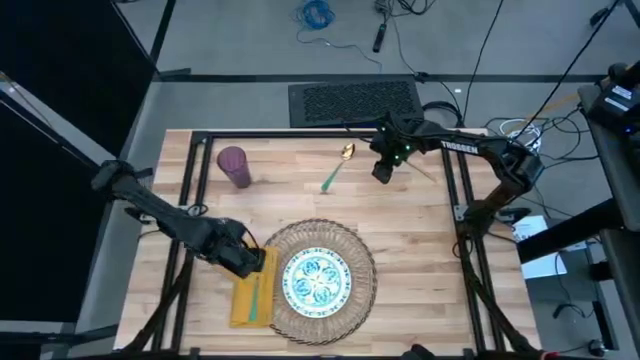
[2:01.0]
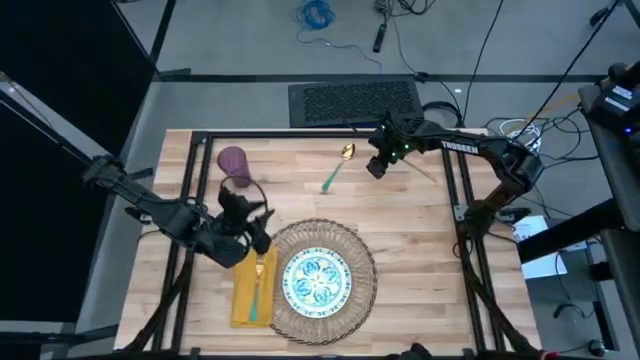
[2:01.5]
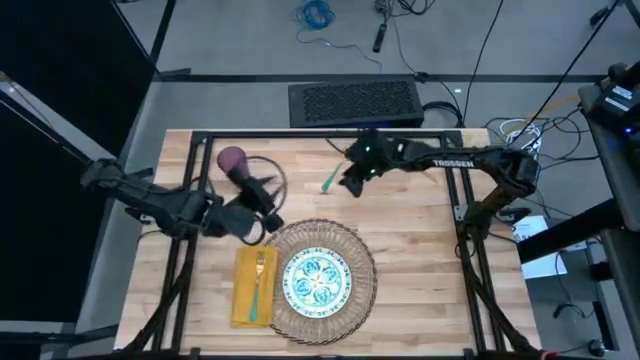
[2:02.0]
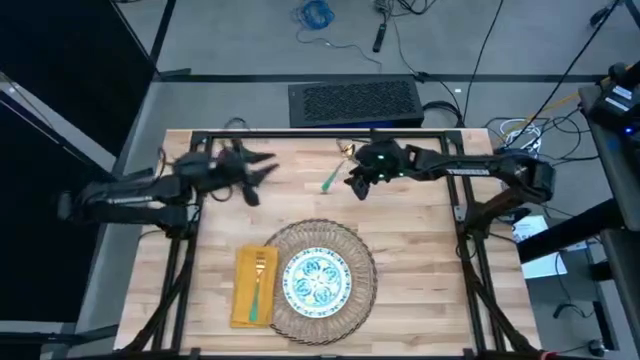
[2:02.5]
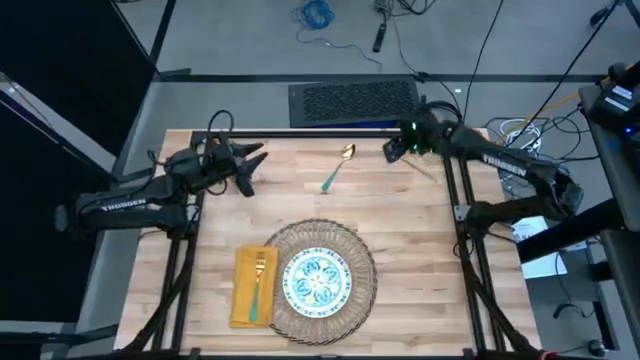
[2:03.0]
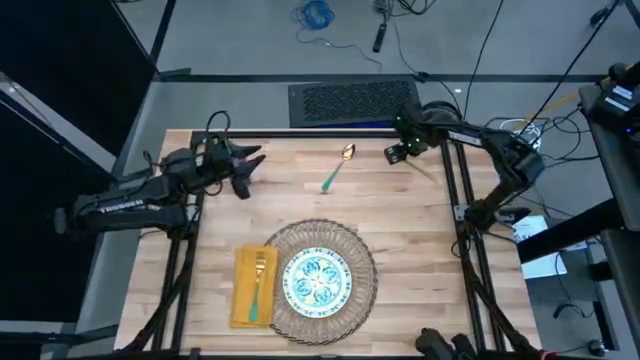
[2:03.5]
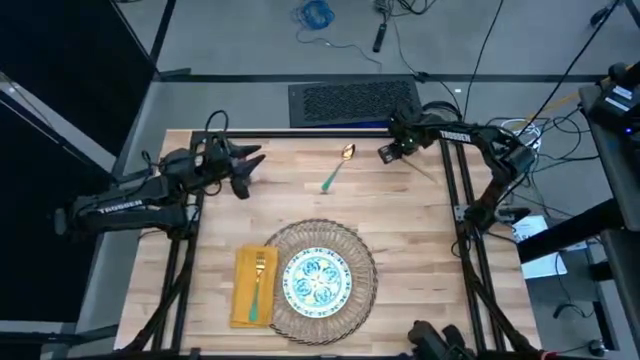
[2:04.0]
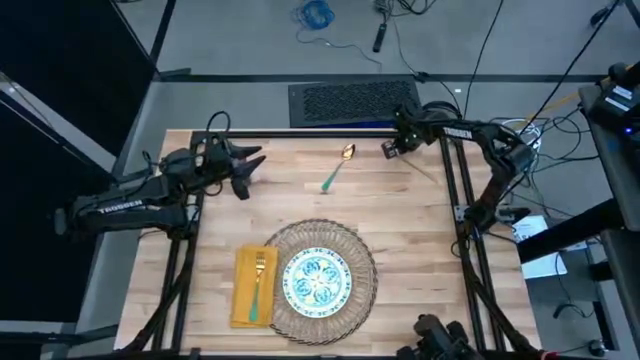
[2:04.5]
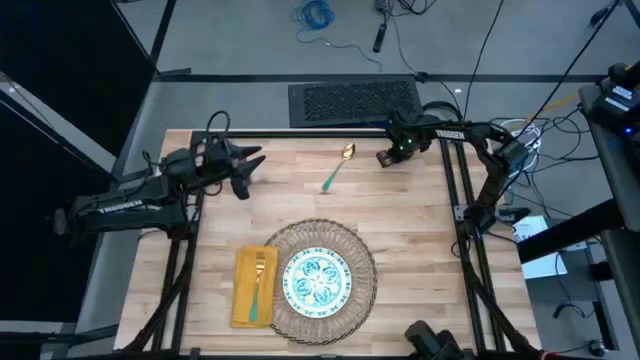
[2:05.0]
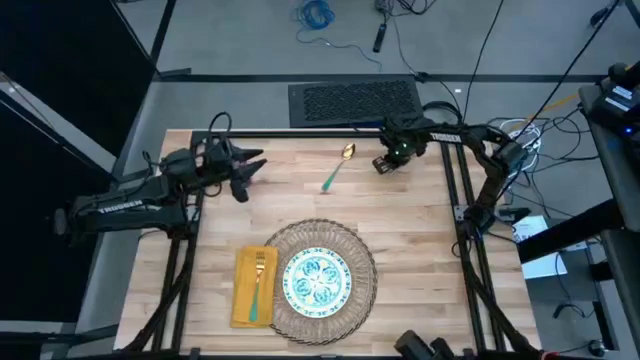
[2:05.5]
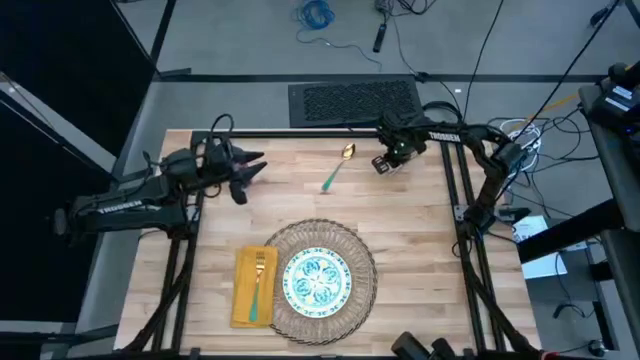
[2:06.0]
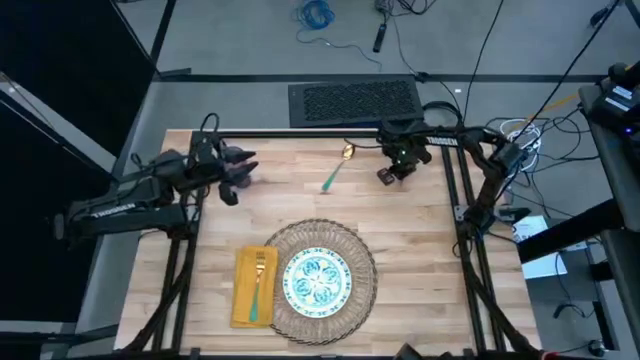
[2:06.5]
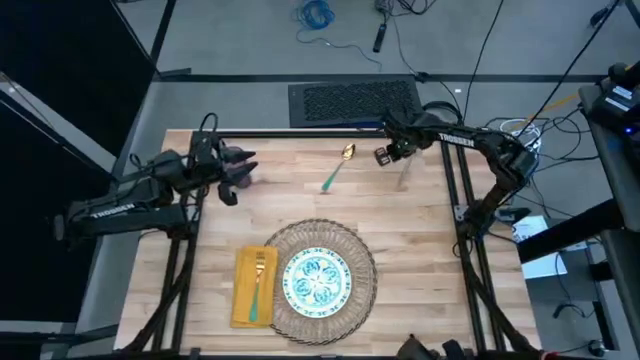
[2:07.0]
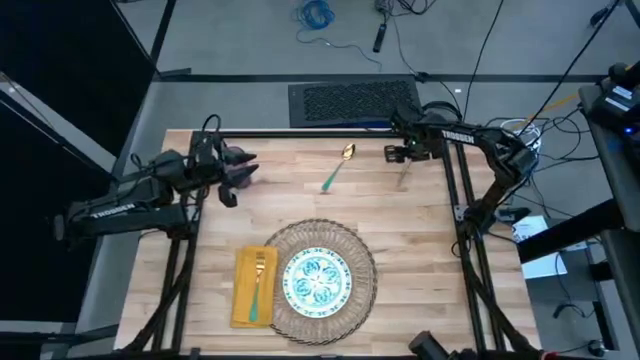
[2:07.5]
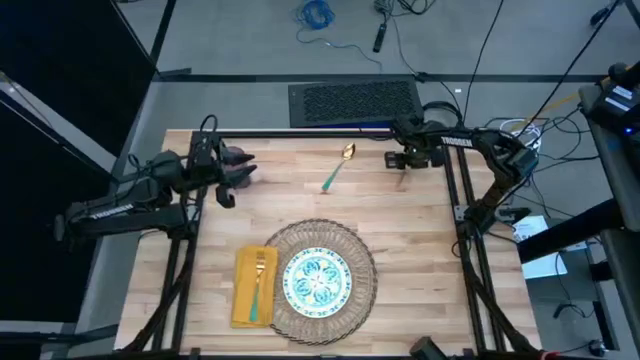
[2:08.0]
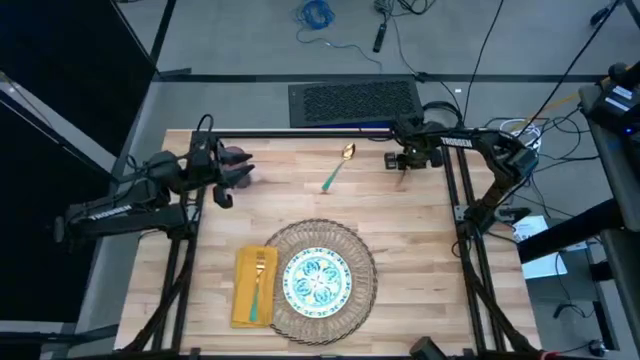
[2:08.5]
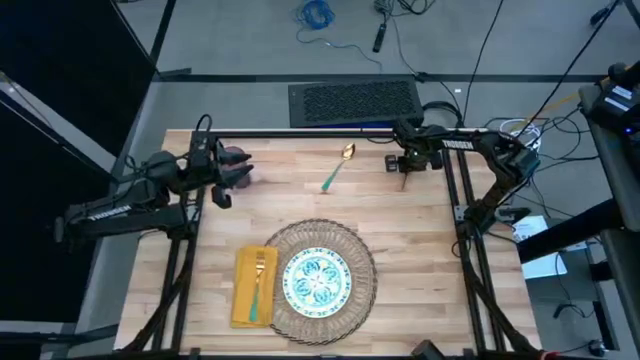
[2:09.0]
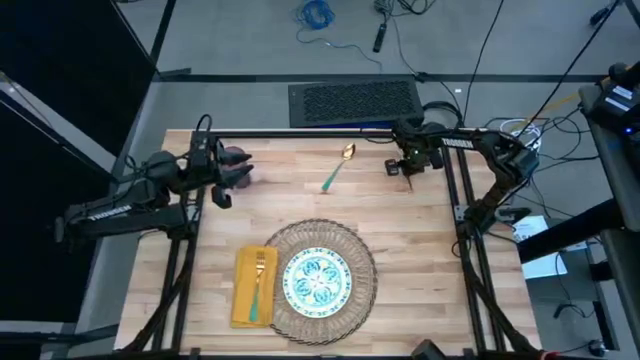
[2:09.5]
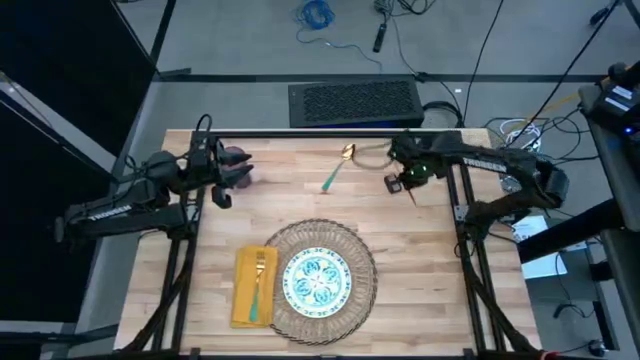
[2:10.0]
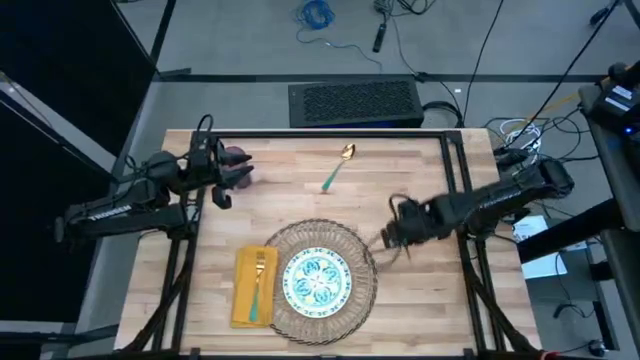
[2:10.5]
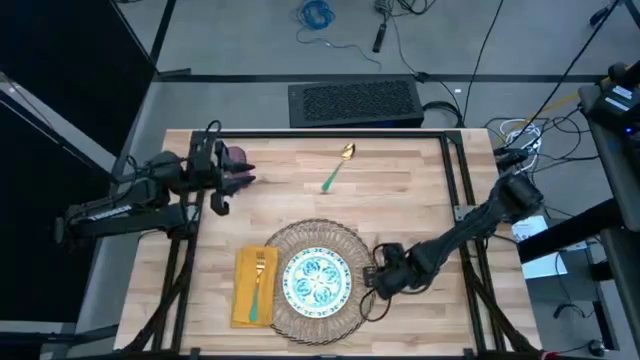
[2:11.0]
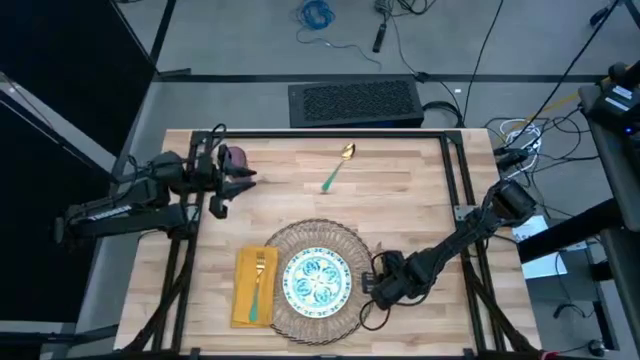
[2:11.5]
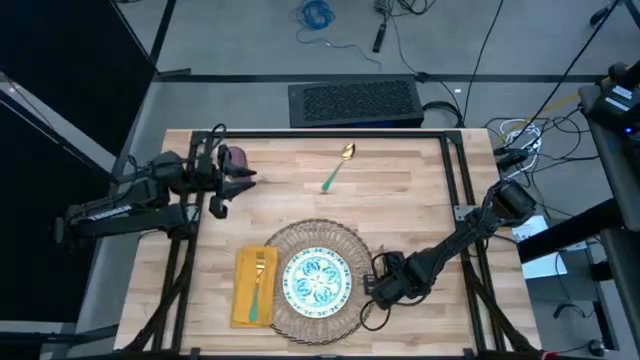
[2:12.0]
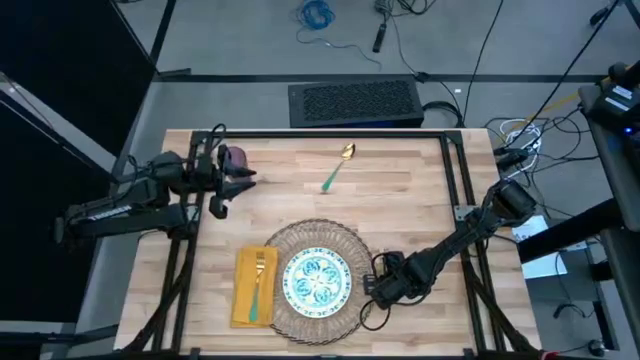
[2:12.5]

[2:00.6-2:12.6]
Task: Set table place
Put the gold knife to the right of the brown placemat

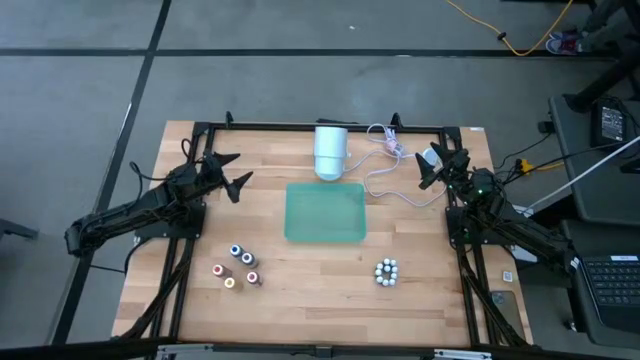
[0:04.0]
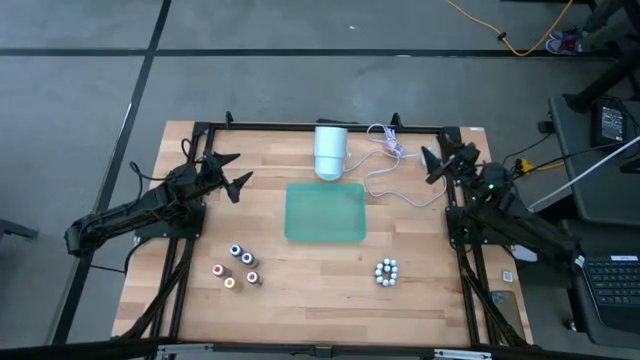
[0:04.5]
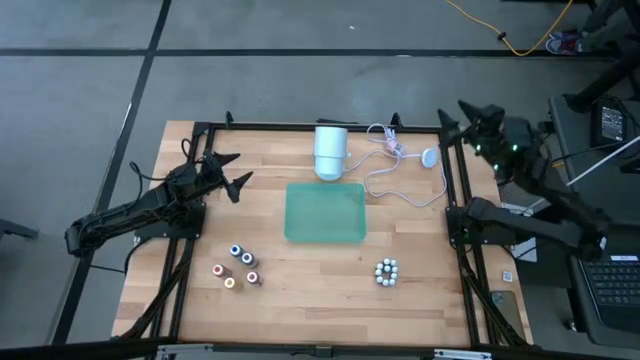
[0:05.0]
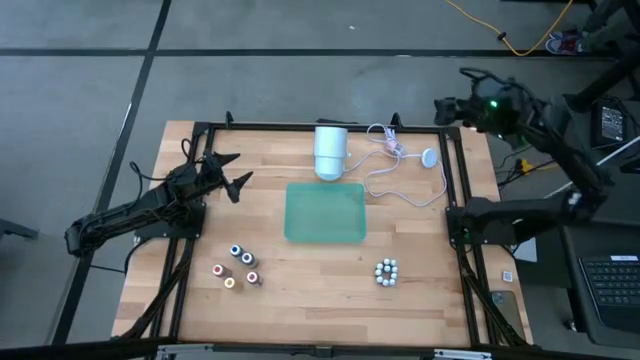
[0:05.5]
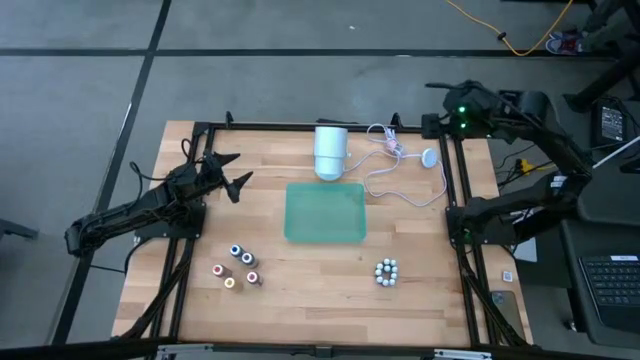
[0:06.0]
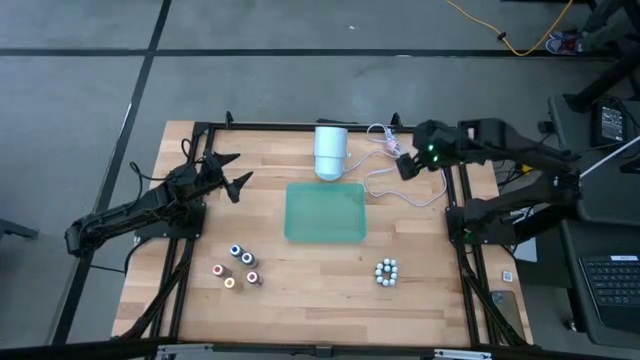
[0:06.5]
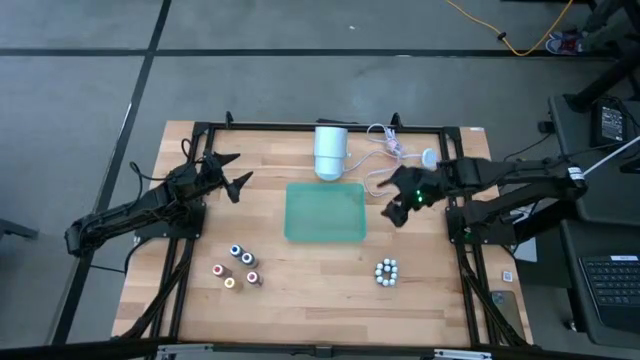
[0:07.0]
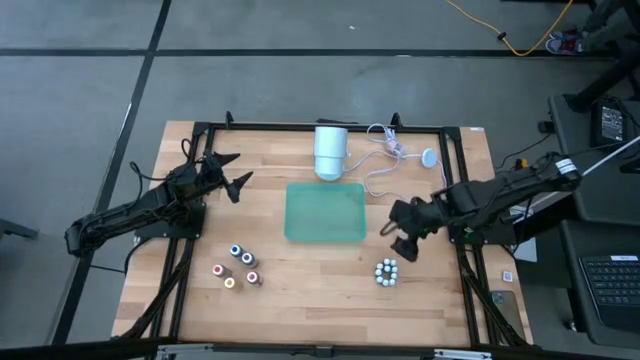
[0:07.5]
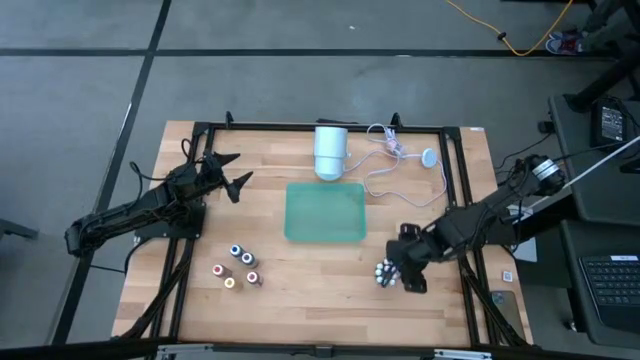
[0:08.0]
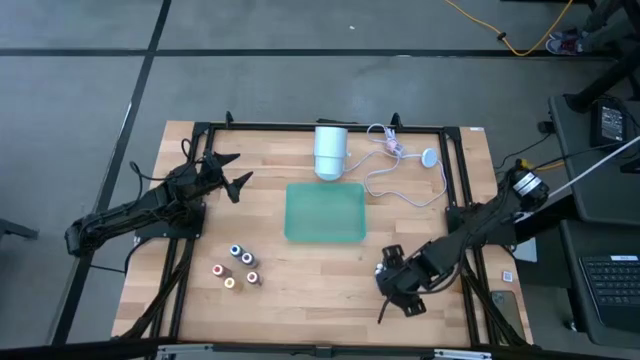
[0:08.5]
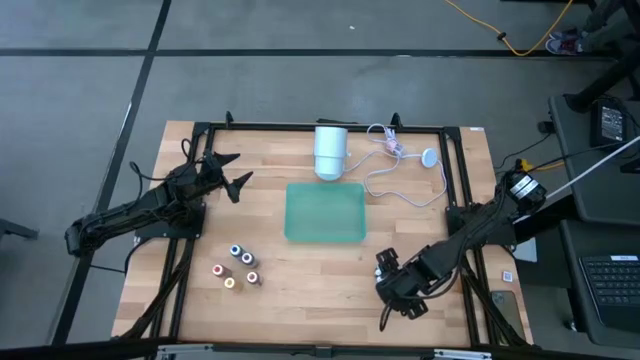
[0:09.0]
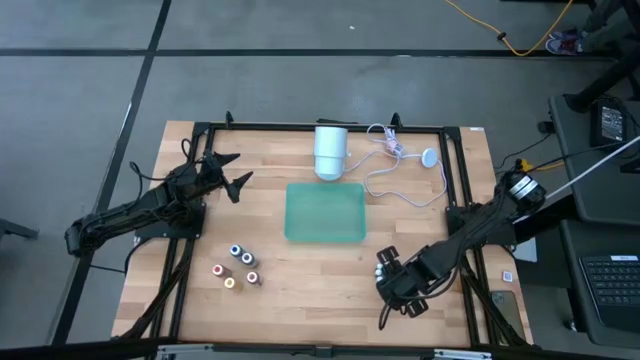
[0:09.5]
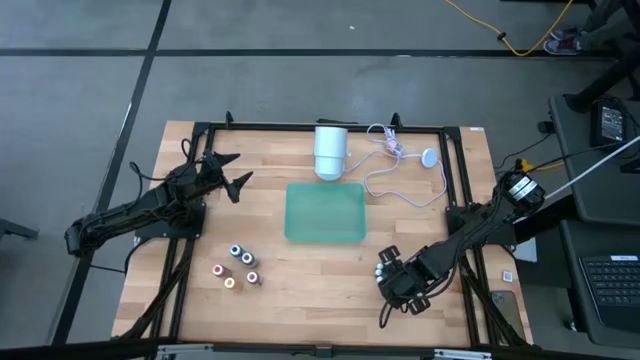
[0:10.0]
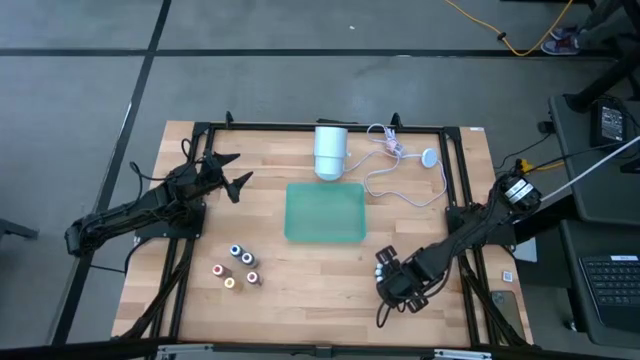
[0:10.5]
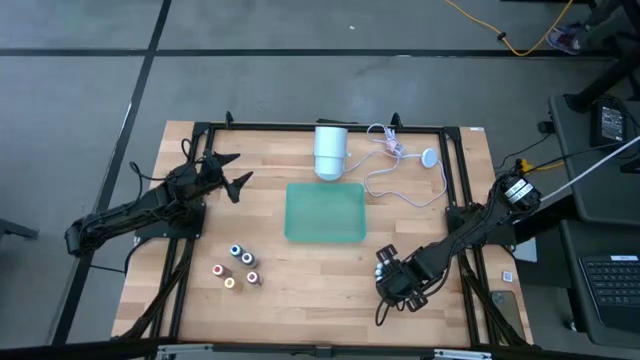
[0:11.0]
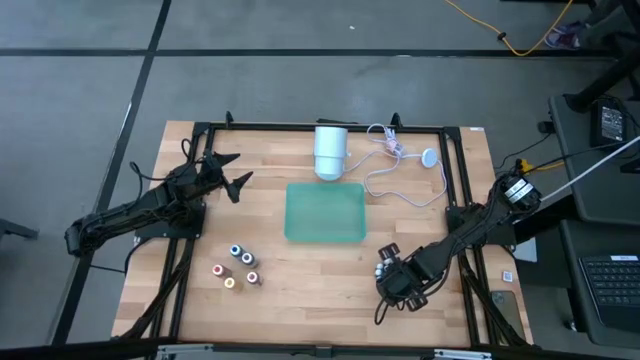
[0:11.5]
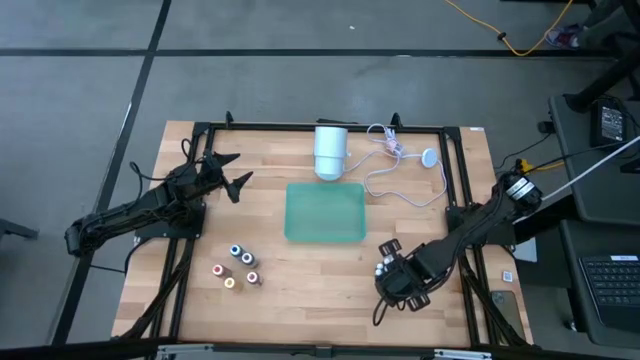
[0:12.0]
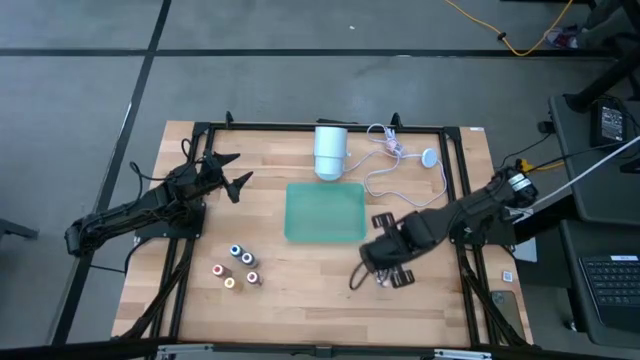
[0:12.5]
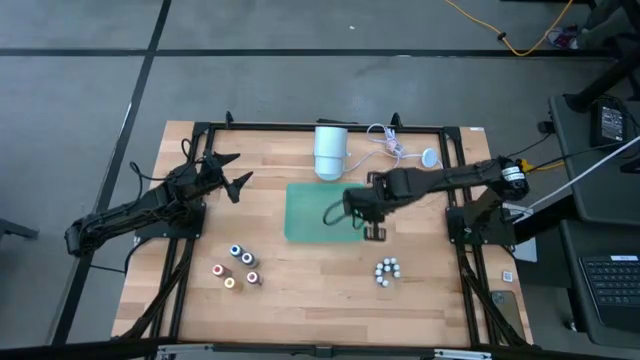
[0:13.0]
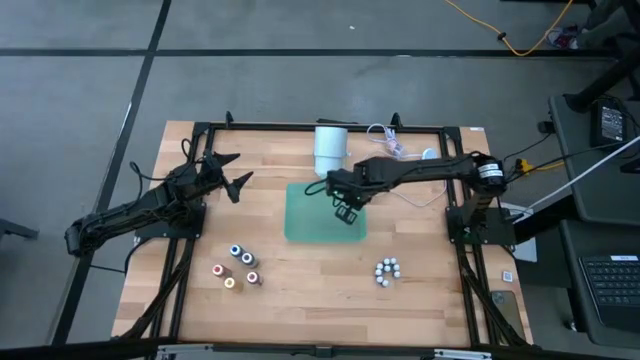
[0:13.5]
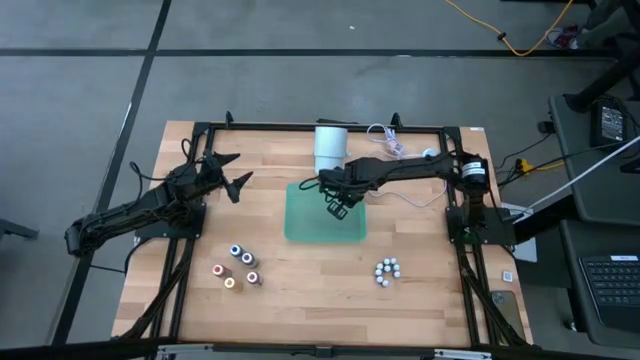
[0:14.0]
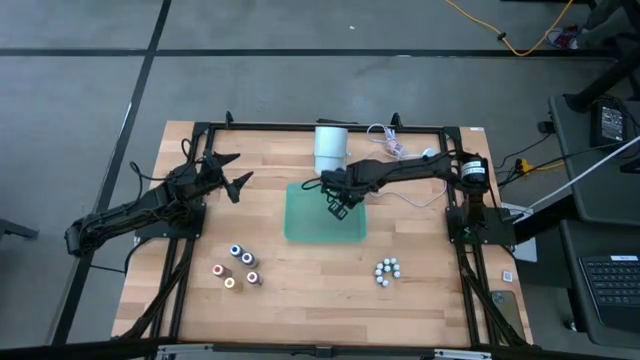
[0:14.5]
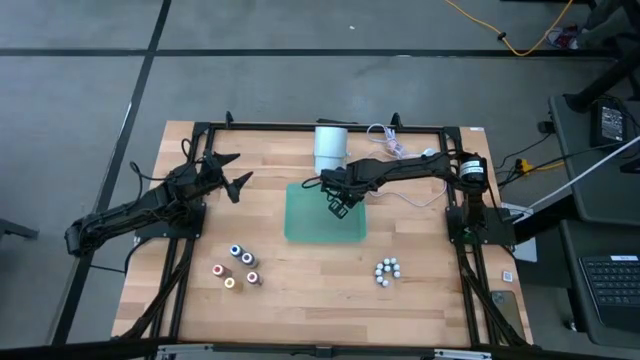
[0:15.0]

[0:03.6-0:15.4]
Task: Pick & Place food coloring
Put the bottom small black food coloring bottle into the green bin
